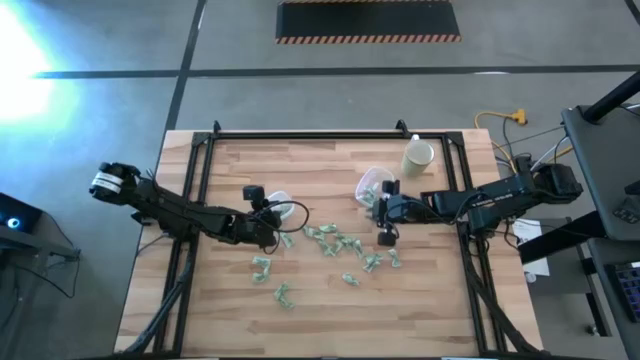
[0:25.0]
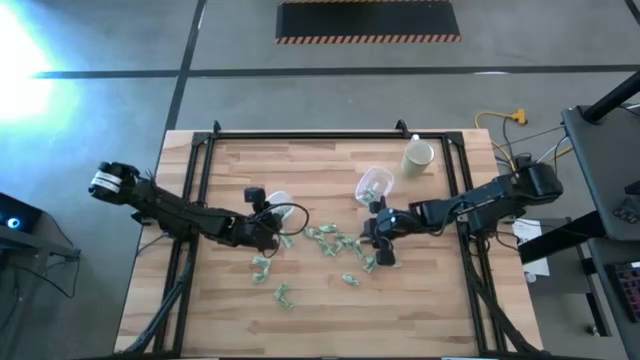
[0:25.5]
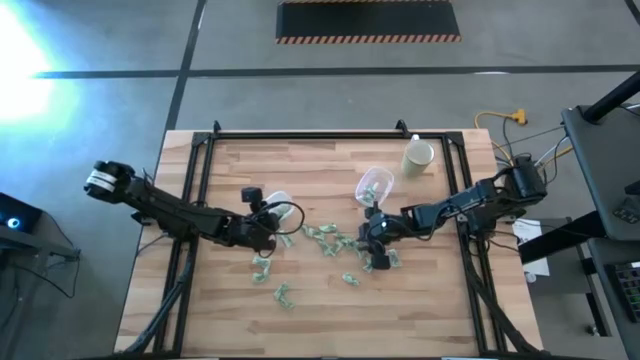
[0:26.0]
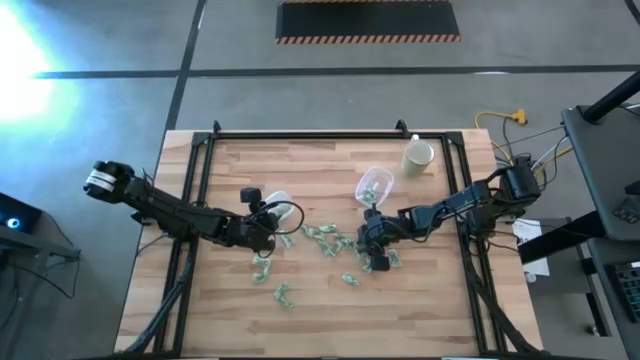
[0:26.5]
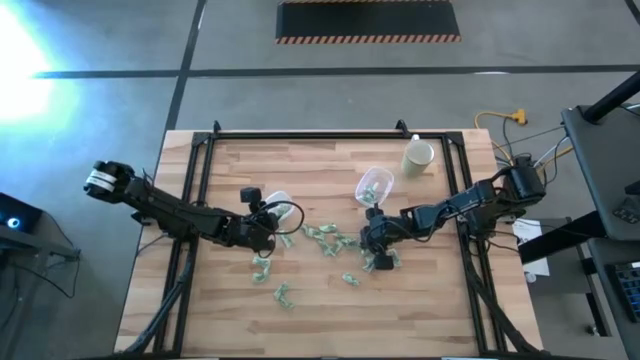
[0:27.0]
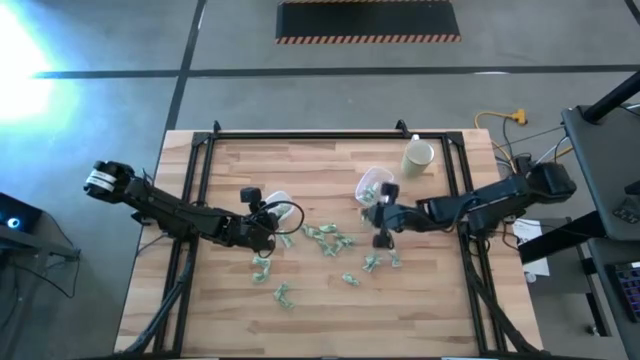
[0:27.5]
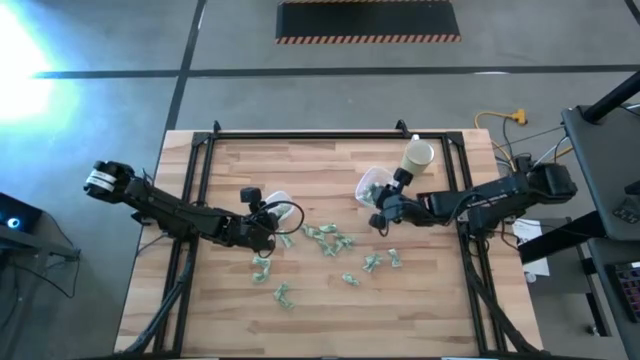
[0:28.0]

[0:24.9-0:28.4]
Task: Pick and place items into bin
Put the stevia packet into the right transparent bin

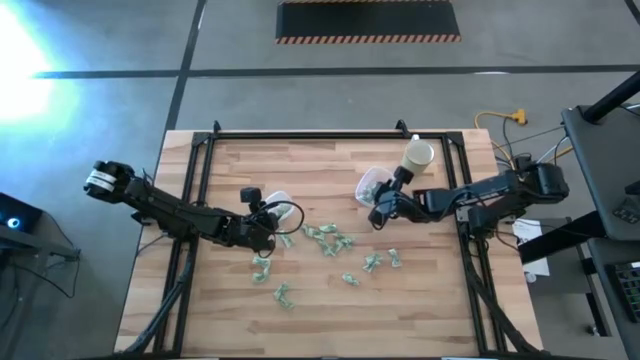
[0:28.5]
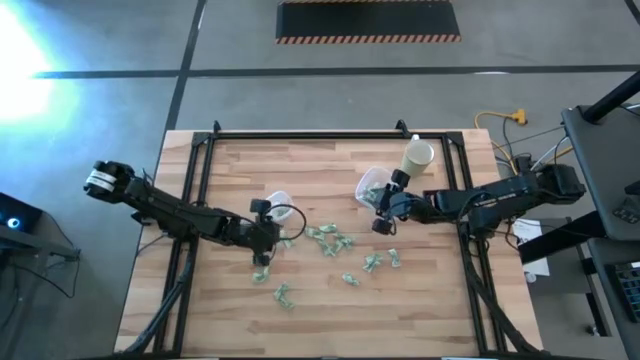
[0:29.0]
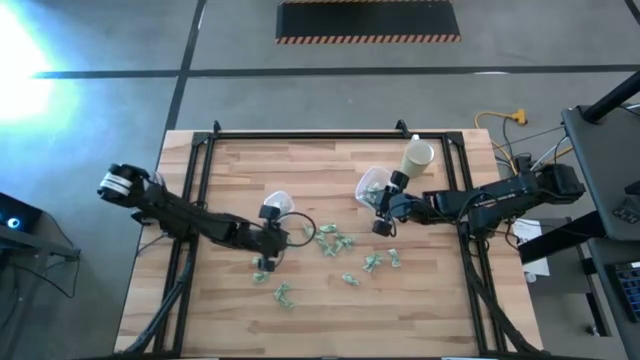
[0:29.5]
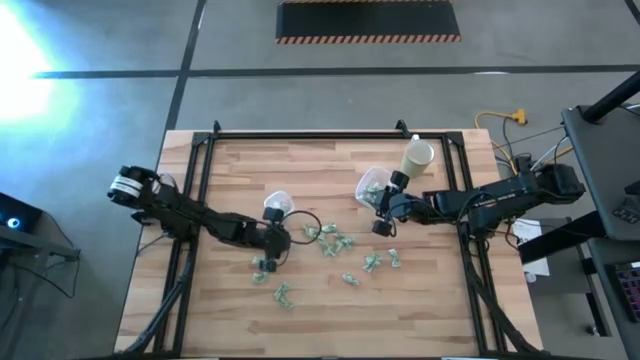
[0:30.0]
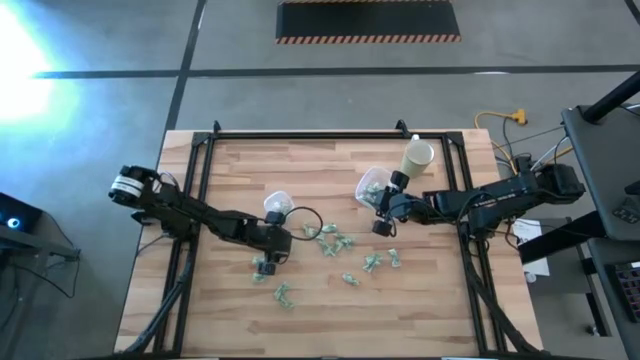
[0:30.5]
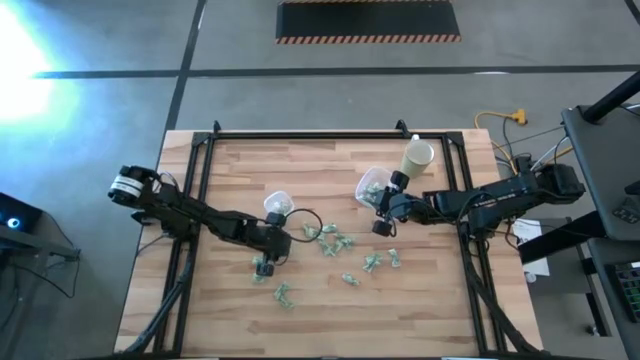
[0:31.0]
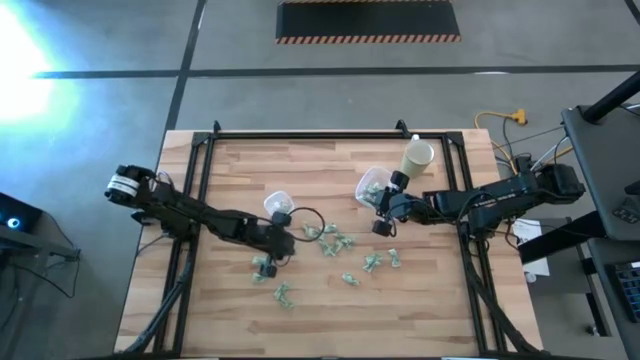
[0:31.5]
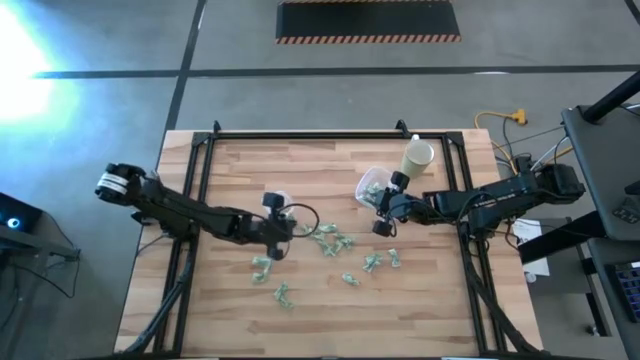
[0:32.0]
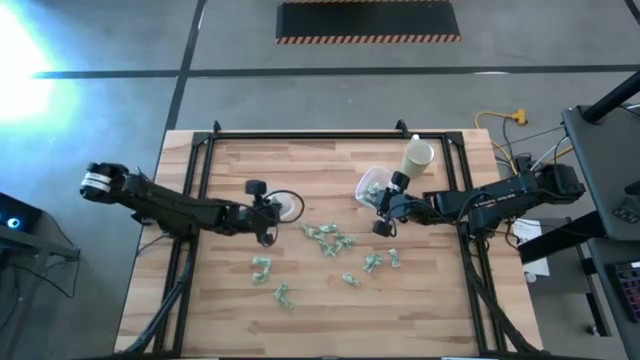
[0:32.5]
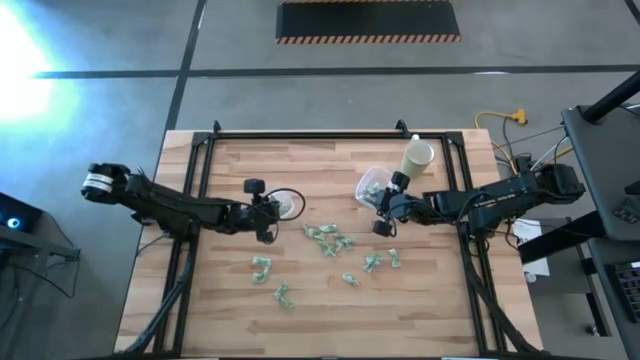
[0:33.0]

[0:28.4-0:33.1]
Put the stevia packet into the left transparent bin

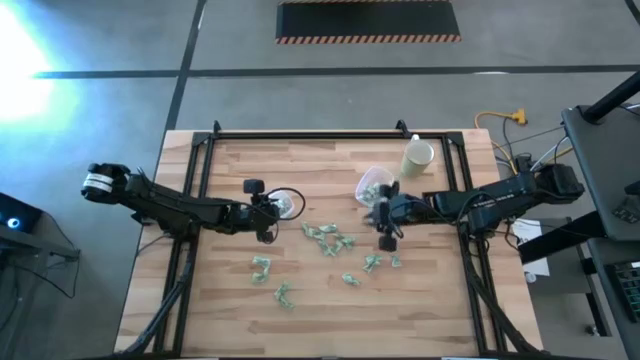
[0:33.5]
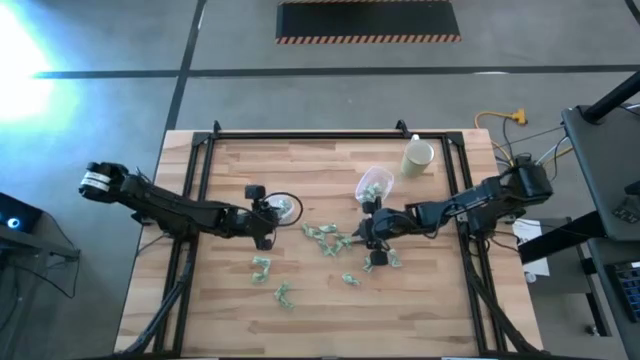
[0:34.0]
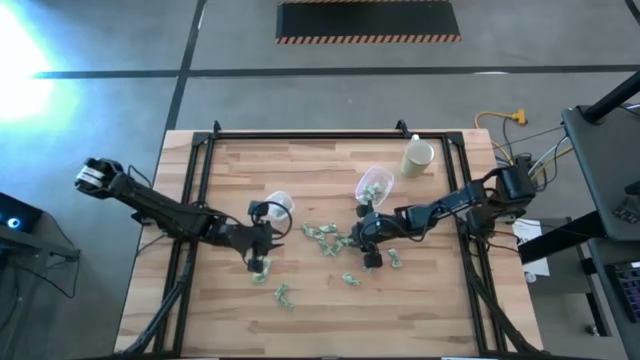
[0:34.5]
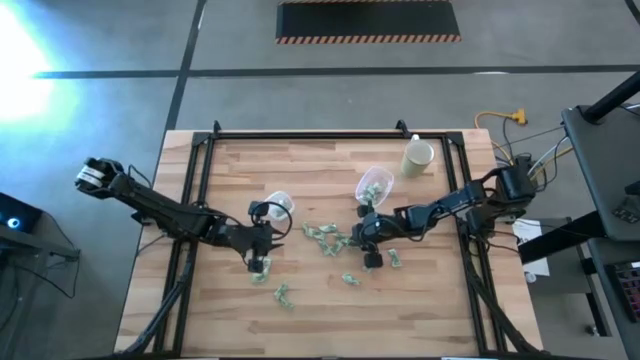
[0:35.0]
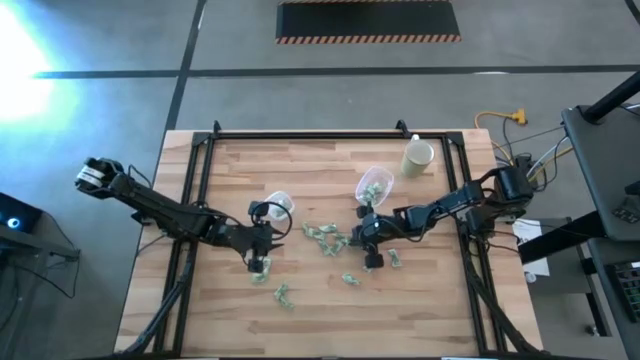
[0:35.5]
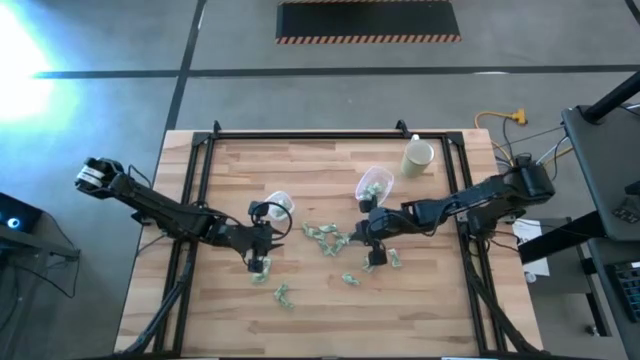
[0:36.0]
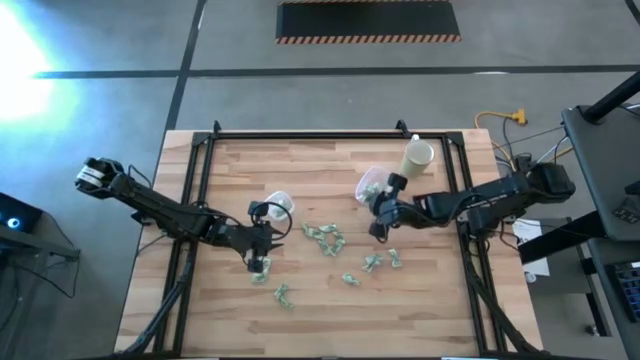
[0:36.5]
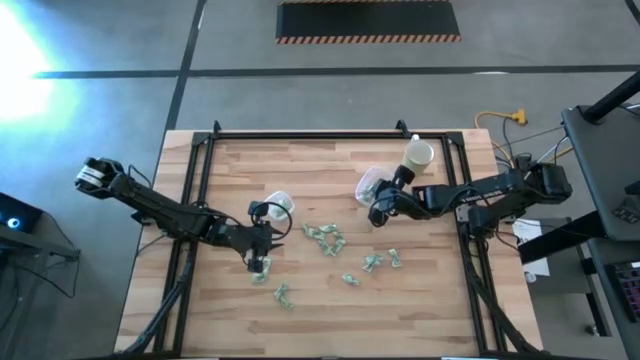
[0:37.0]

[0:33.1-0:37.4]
Put the stevia packet into the right transparent bin

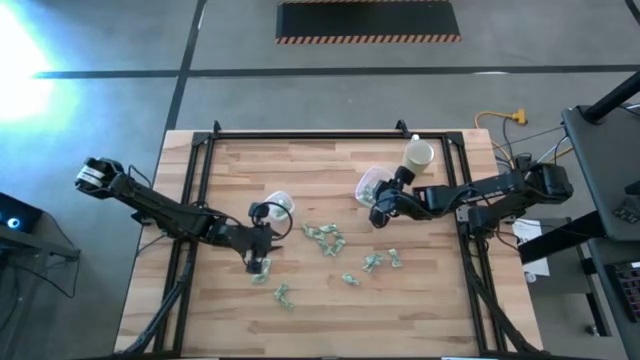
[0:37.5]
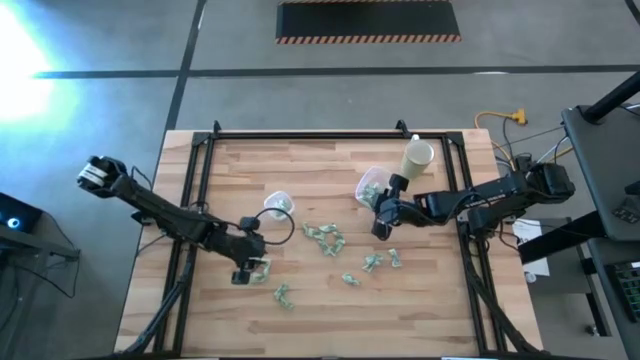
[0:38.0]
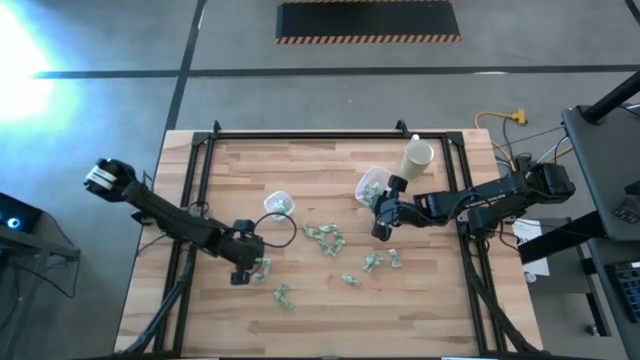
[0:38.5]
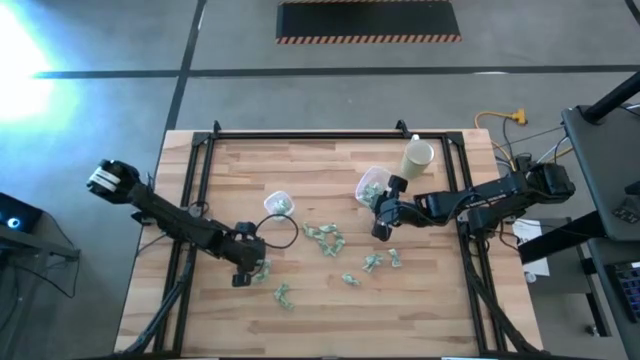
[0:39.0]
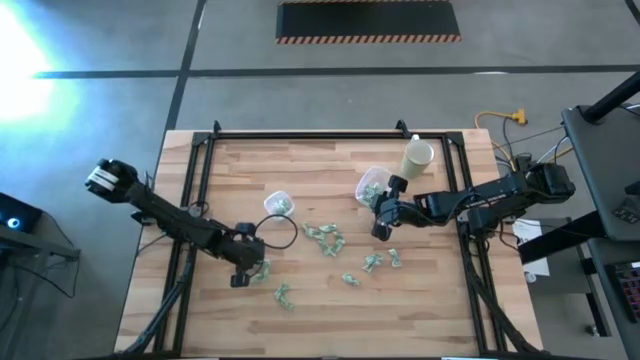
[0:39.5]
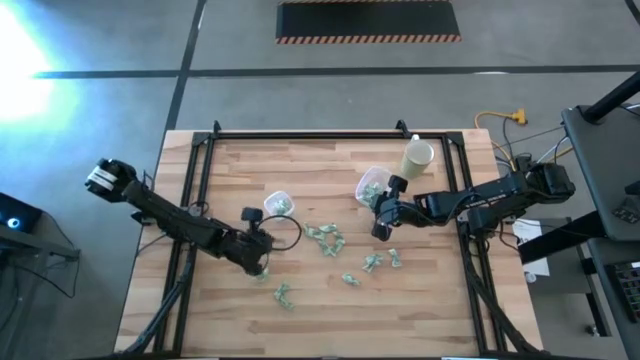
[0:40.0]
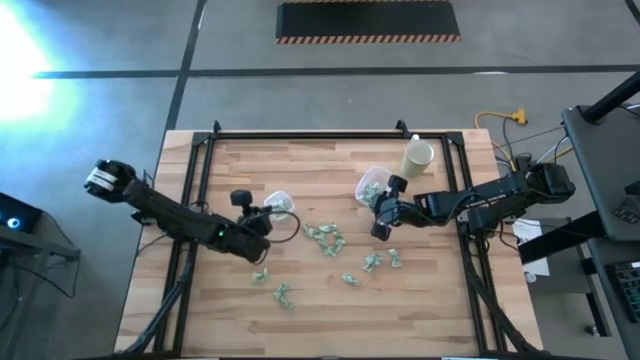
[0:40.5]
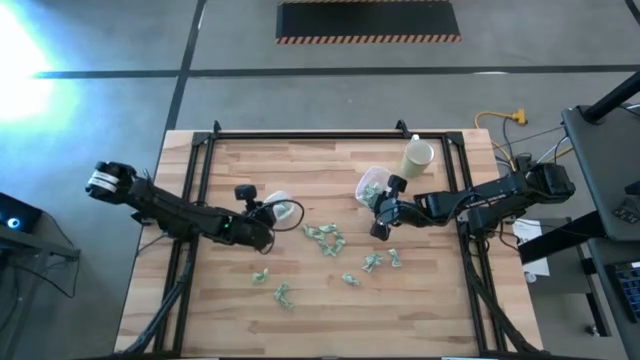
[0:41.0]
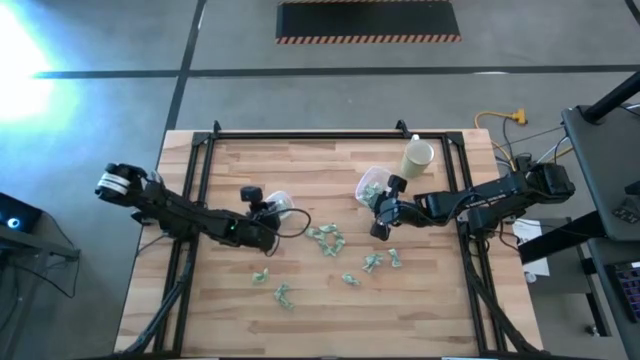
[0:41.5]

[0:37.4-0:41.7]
Put the stevia packet into the left transparent bin

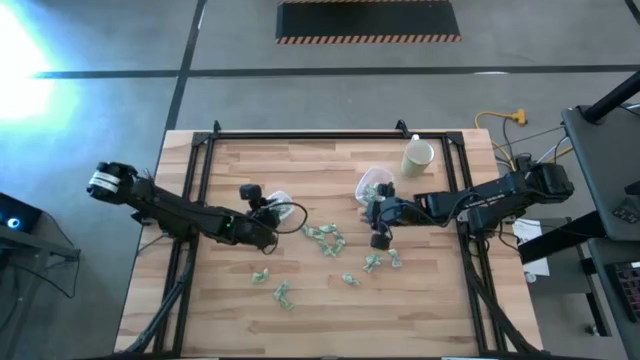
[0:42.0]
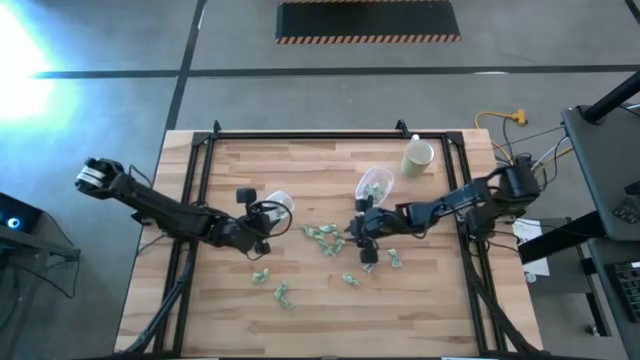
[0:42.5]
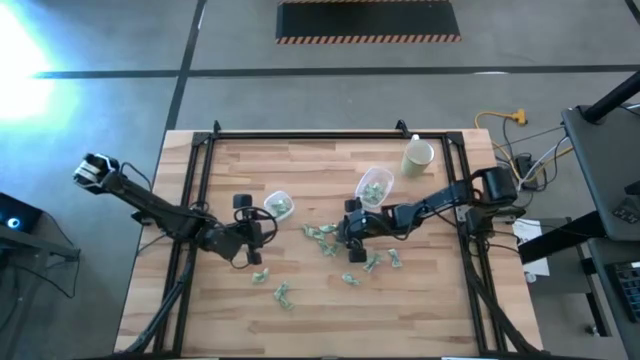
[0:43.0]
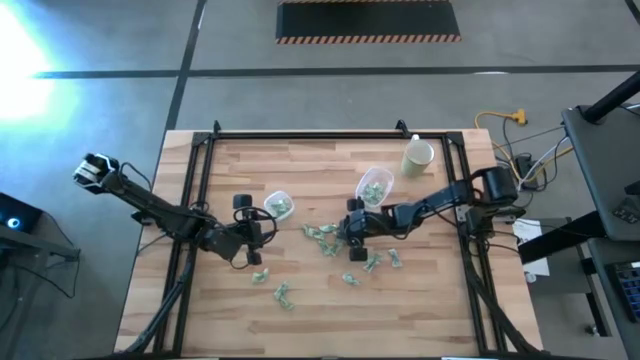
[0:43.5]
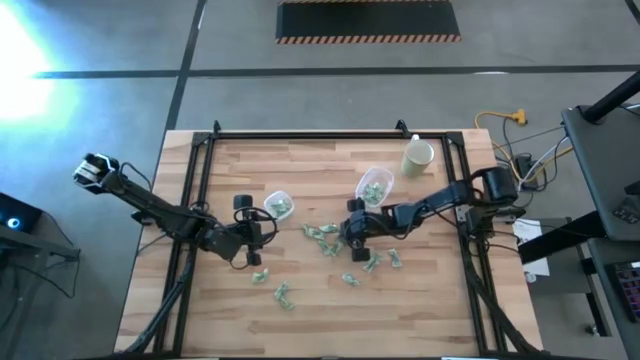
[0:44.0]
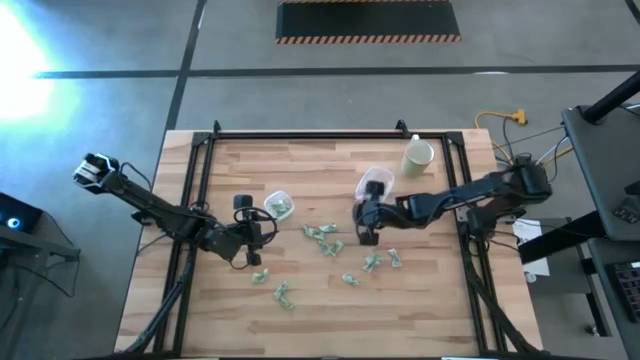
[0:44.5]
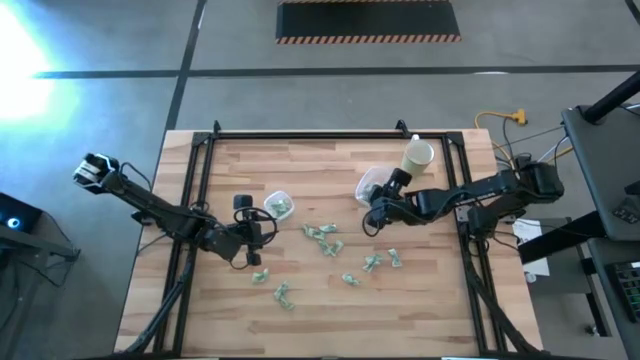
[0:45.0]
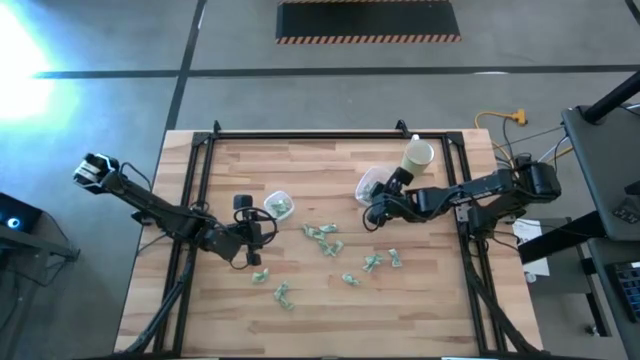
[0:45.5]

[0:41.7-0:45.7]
Put the stevia packet into the right transparent bin
